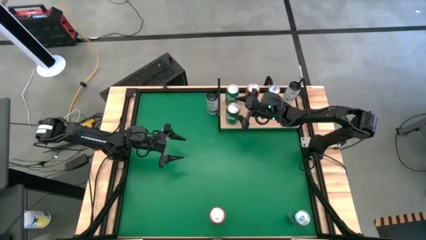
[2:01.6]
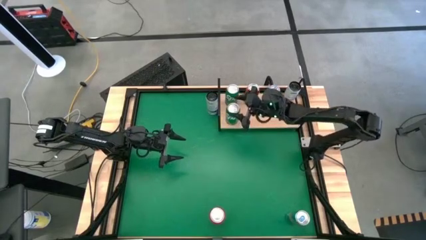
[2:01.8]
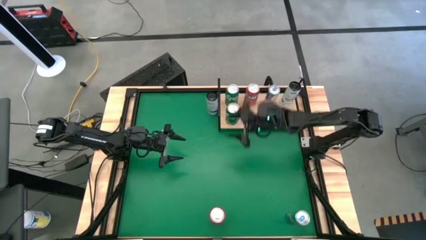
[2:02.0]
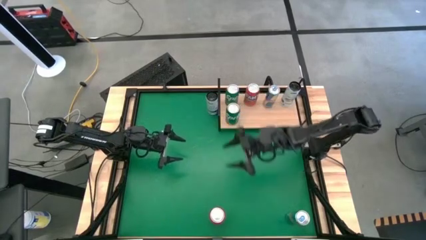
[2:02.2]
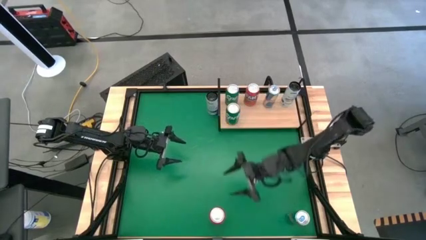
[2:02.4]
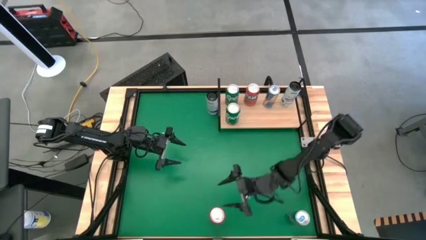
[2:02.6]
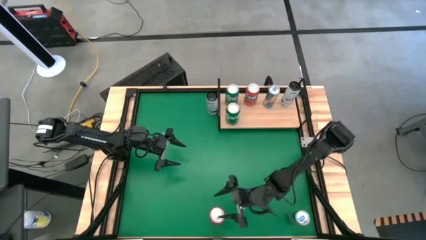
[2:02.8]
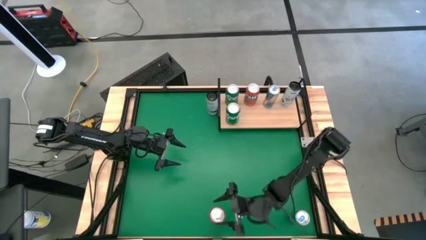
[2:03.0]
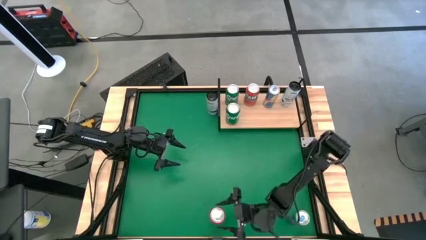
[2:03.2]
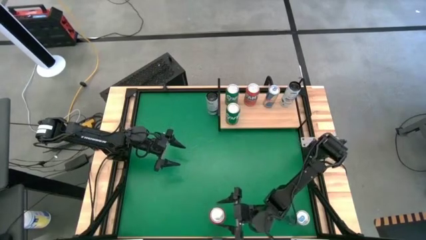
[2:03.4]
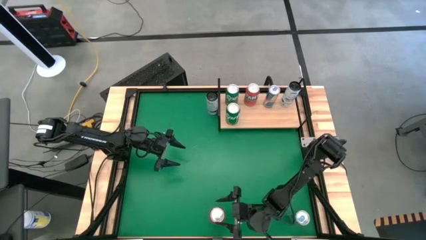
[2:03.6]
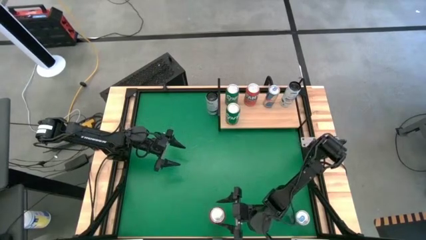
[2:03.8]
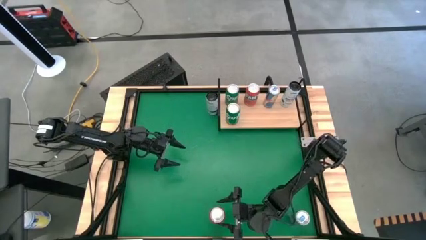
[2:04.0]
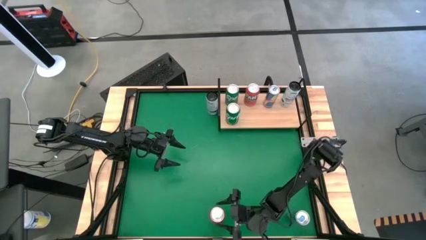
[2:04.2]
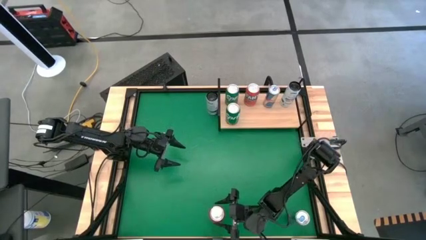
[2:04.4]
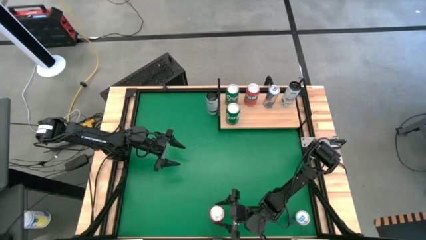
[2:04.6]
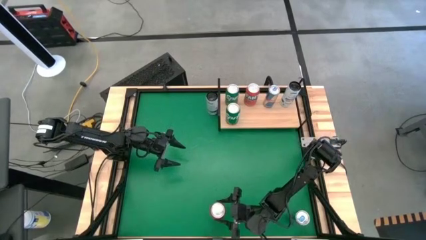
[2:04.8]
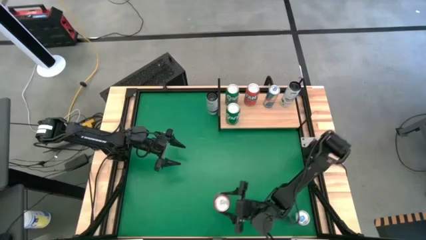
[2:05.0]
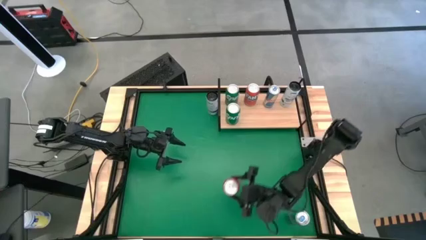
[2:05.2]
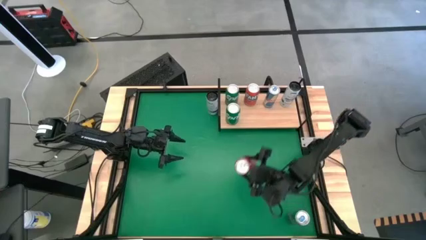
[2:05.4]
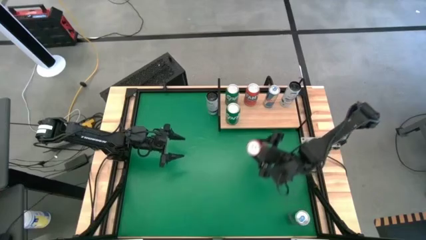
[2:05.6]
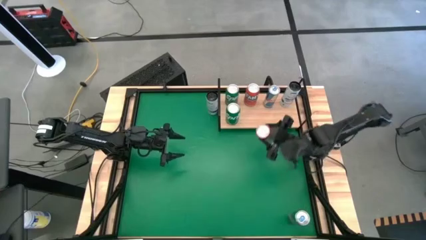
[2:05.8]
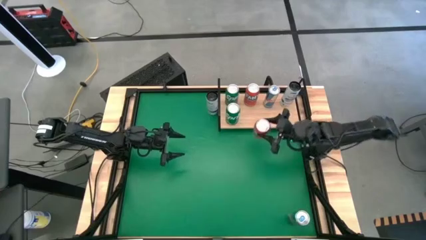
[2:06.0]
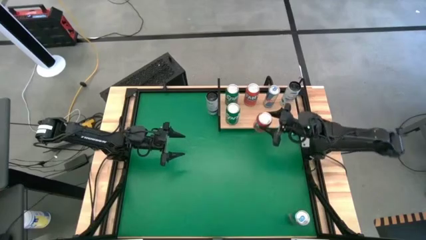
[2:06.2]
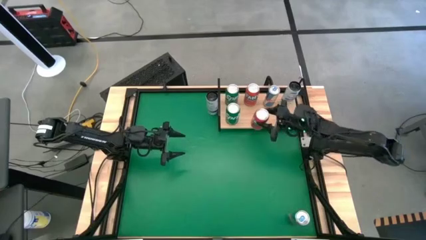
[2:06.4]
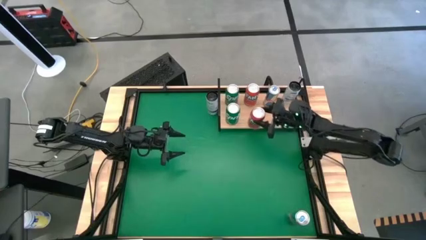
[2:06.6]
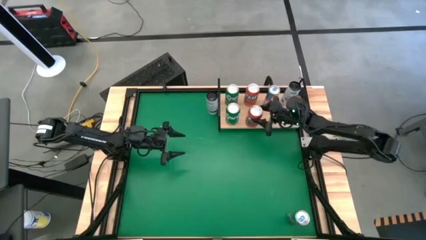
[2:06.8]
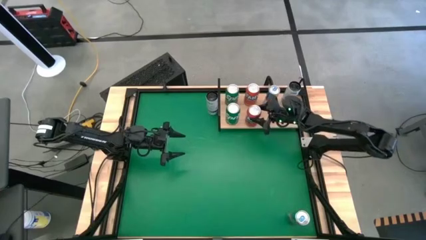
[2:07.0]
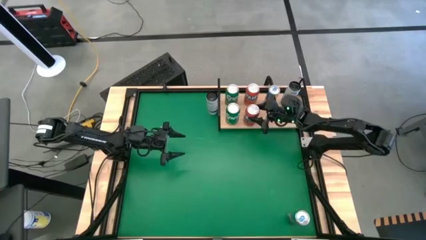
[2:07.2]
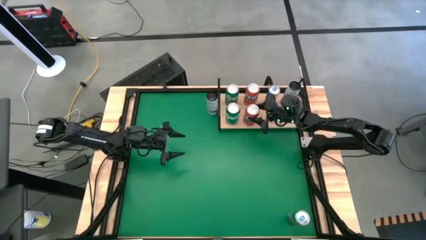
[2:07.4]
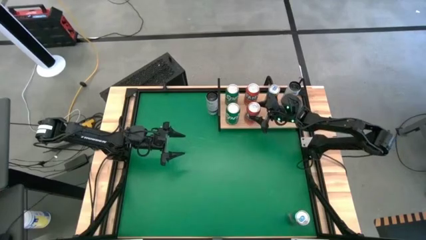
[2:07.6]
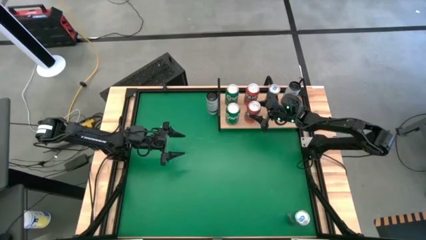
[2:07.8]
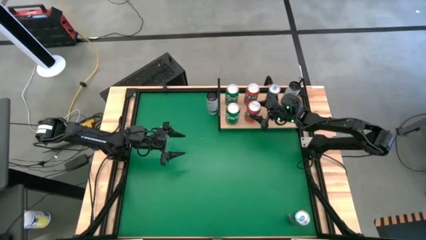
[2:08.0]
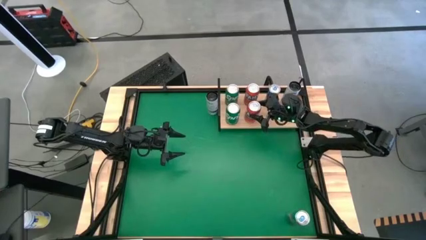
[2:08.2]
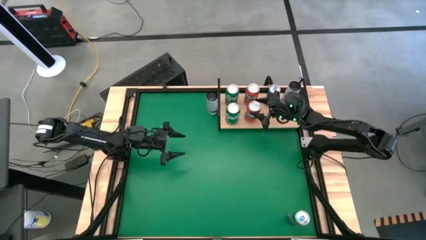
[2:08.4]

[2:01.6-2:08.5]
Task: Place canned beverage on shelf
Put the orange soda can on the shelf aligned with the other orange soda can

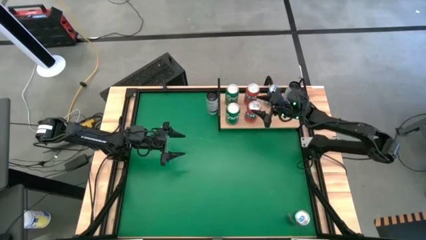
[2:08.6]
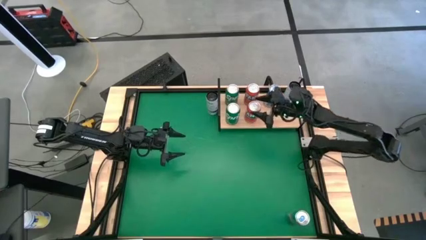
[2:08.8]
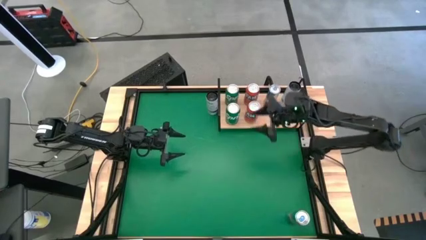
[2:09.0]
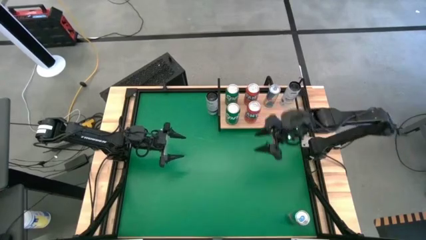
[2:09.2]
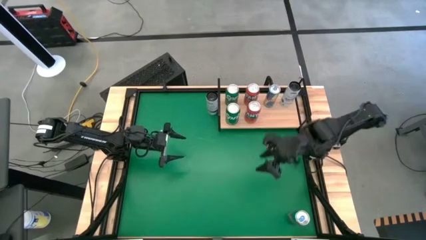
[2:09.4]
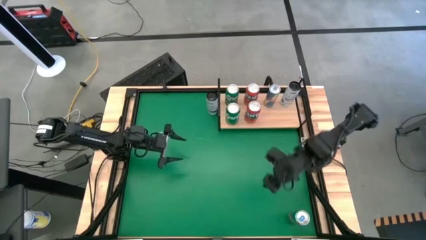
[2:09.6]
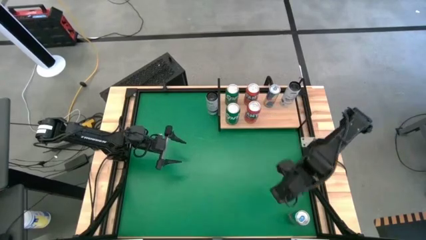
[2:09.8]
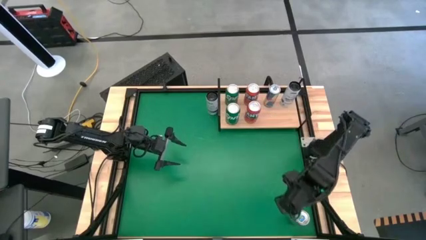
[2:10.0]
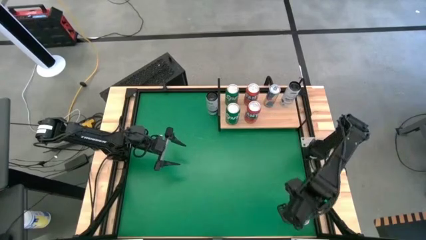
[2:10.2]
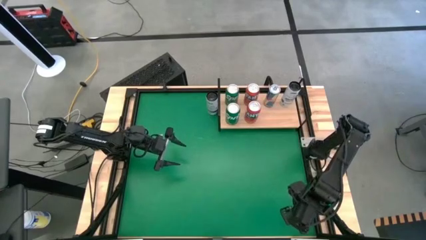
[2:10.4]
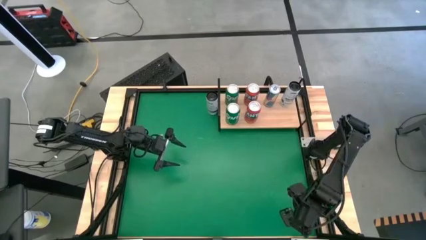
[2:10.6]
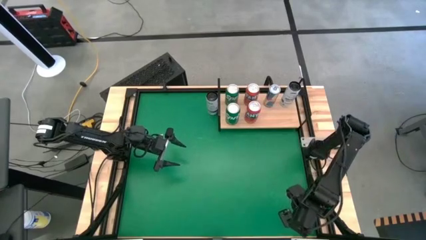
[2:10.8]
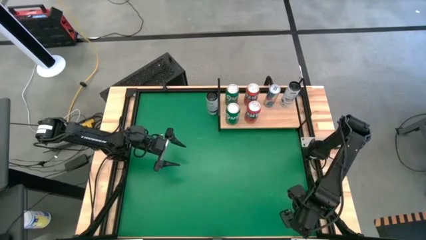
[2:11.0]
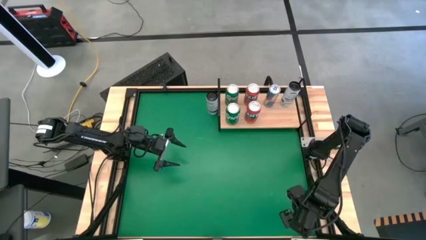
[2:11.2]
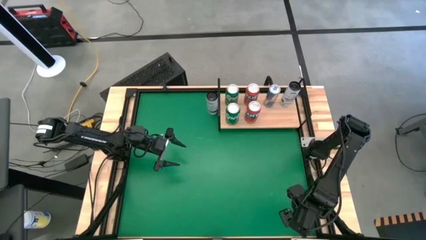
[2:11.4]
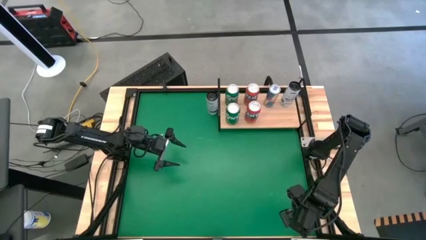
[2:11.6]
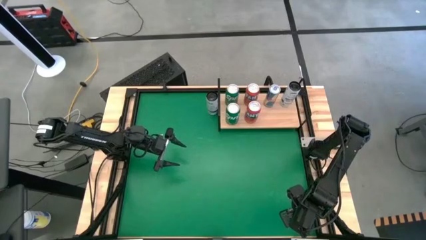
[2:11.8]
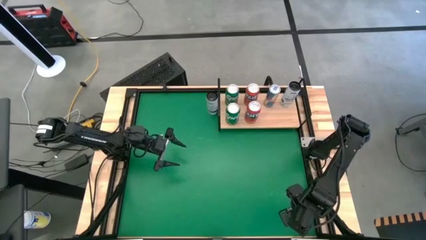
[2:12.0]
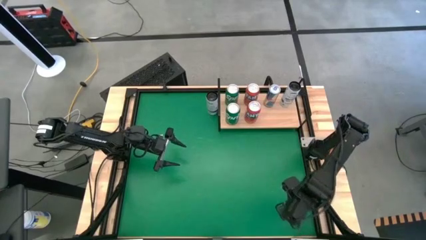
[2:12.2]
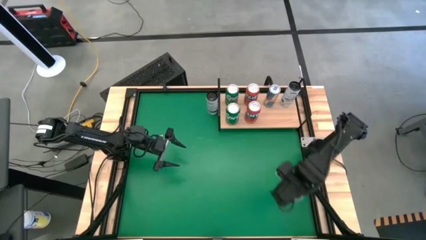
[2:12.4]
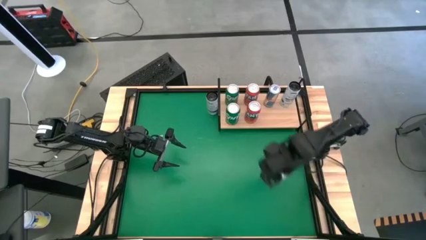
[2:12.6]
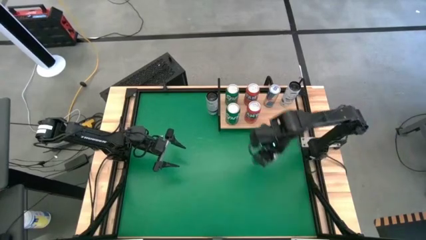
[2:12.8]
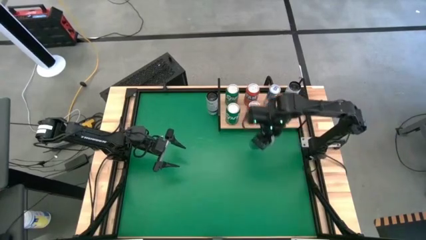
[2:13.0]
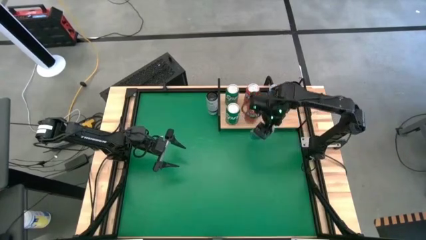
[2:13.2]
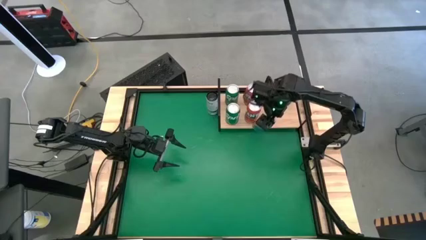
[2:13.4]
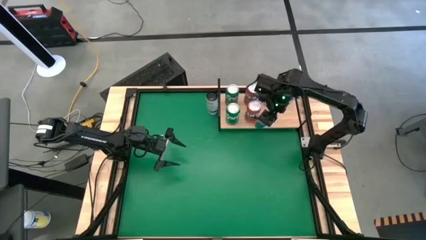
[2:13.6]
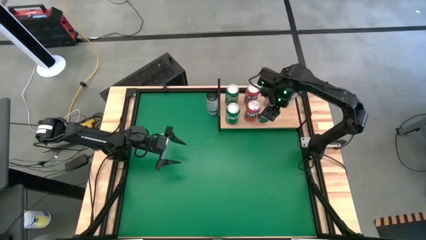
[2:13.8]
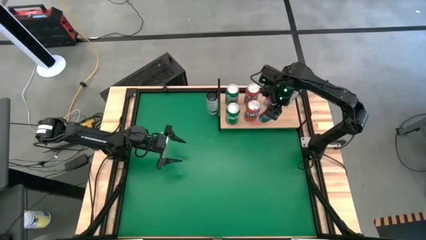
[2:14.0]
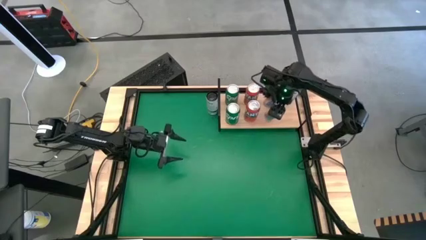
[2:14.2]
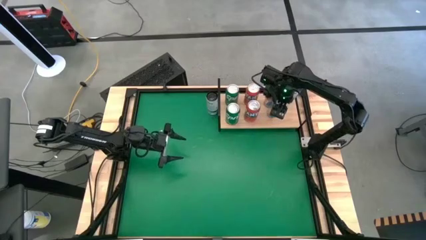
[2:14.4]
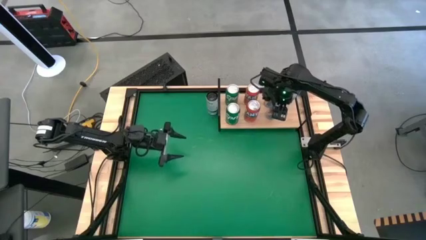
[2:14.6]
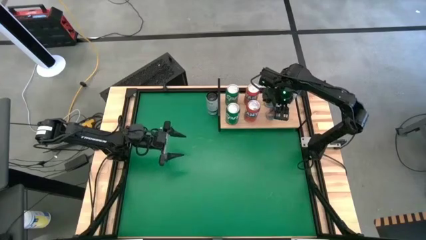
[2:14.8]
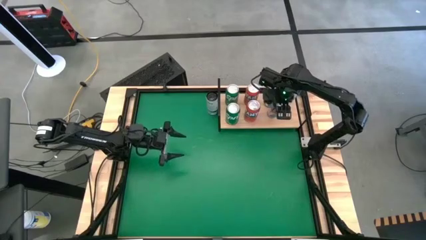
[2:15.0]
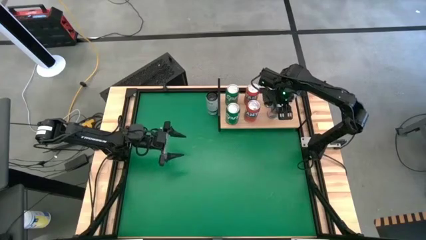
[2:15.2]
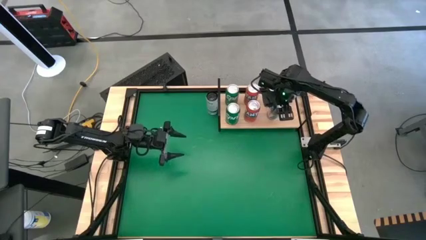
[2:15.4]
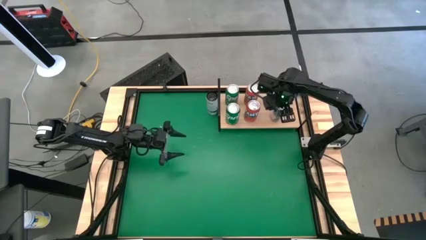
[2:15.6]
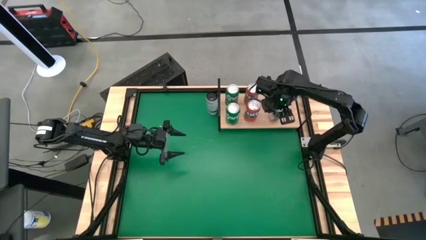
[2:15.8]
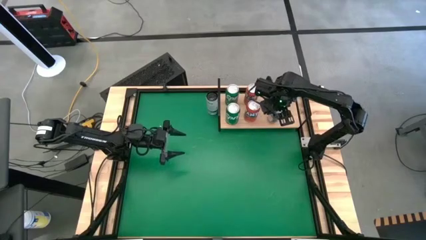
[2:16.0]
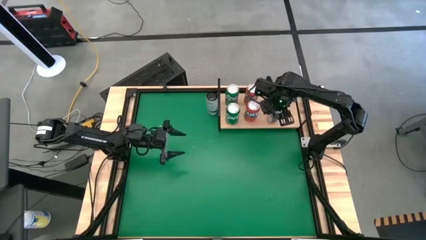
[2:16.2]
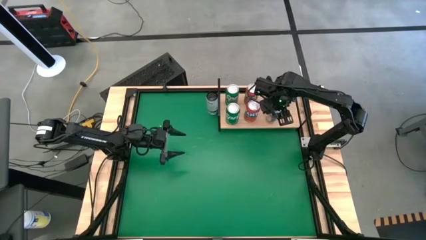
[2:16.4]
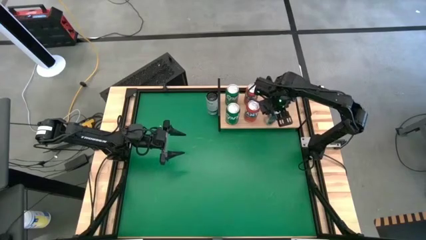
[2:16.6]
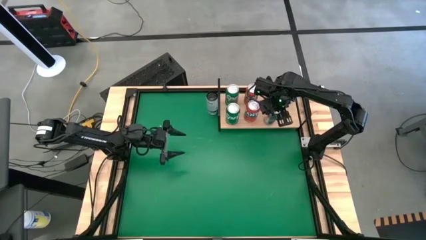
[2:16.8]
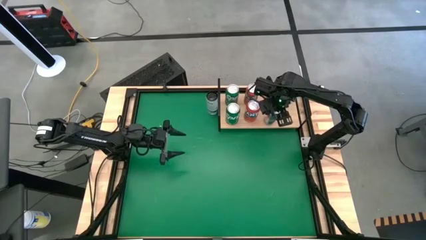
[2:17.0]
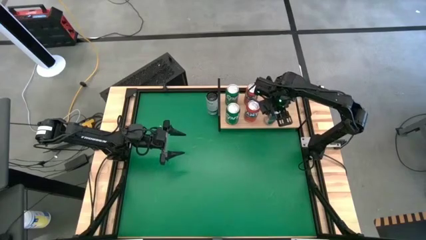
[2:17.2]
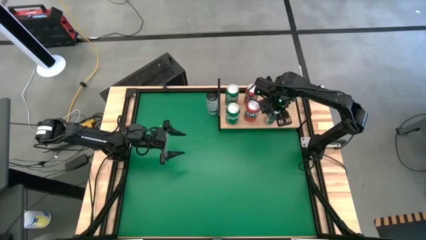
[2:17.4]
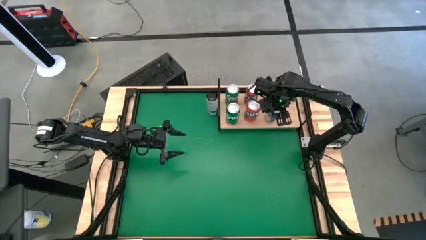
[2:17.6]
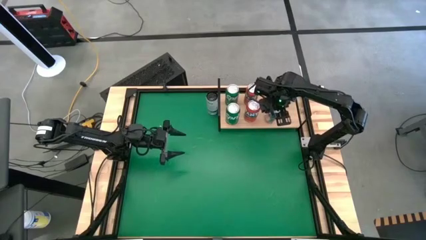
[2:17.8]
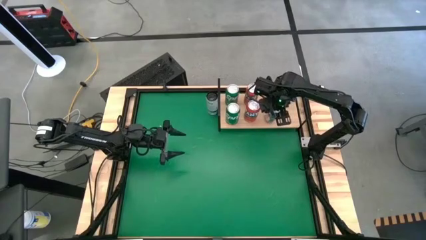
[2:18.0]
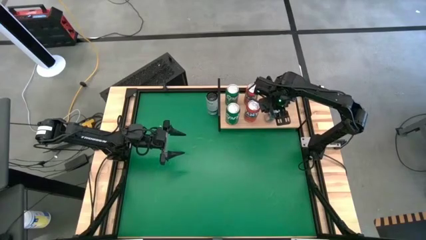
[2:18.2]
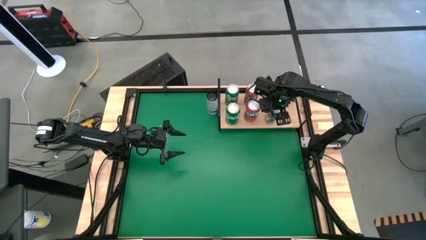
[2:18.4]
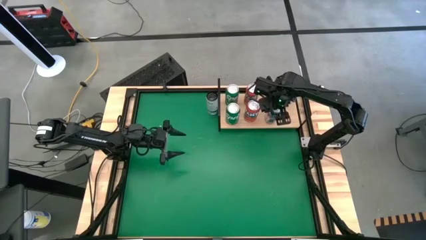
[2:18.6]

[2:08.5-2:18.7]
Put the blue soda can on the shelf aligned with the other blue soda can
